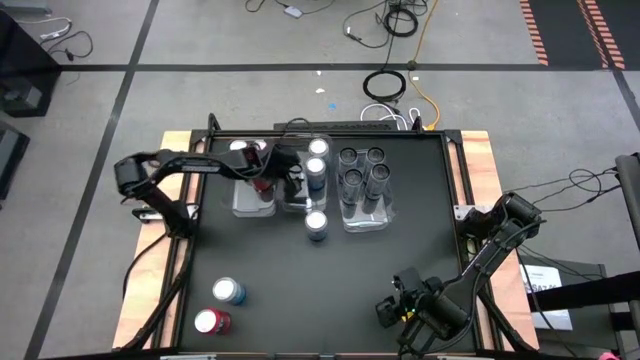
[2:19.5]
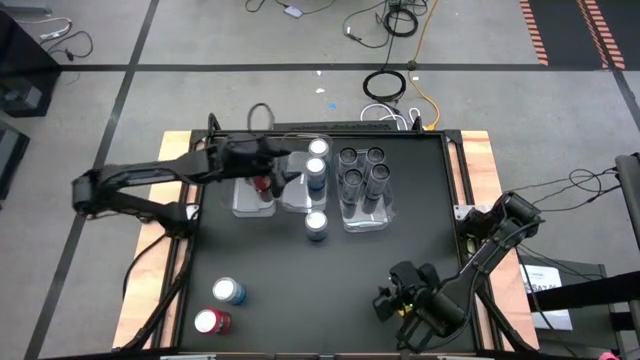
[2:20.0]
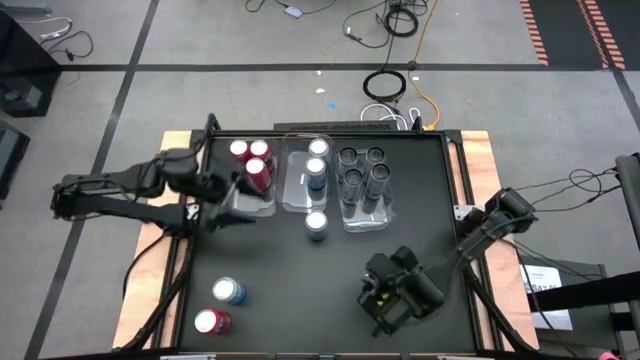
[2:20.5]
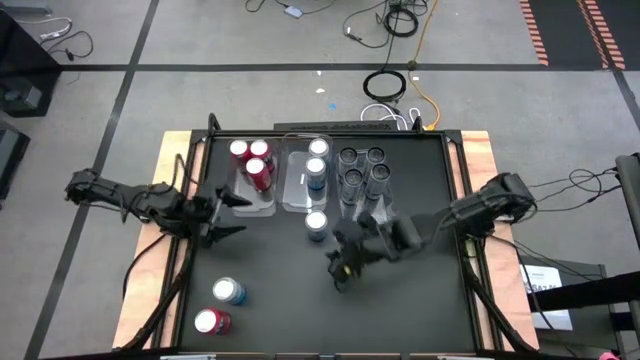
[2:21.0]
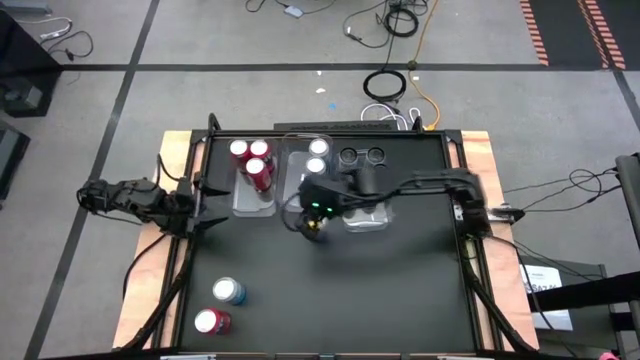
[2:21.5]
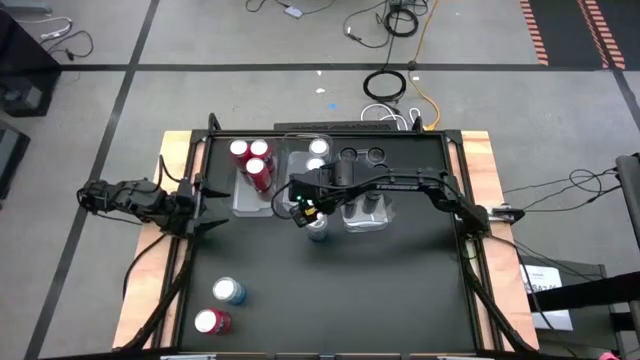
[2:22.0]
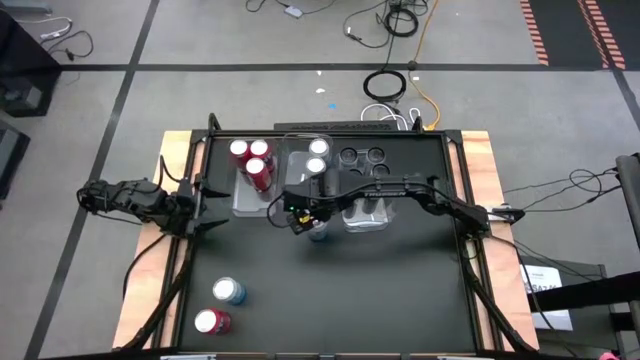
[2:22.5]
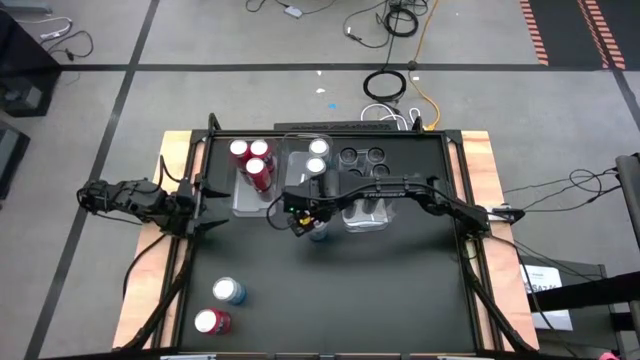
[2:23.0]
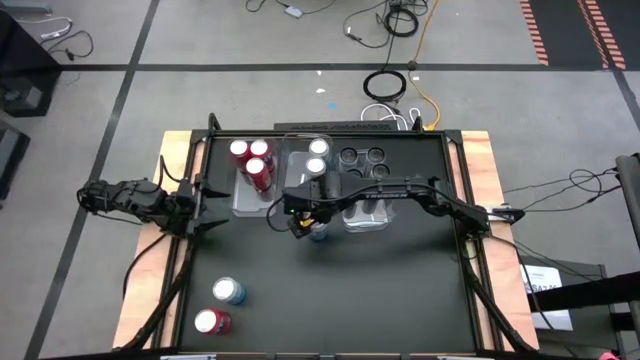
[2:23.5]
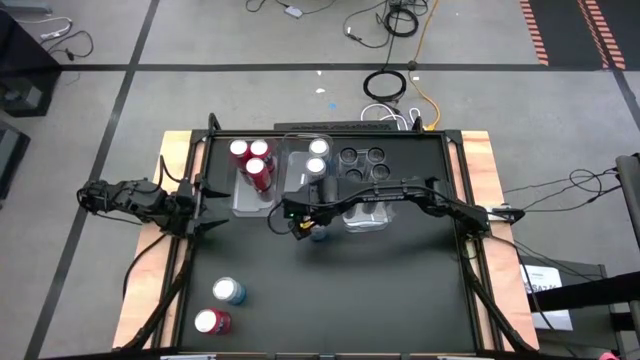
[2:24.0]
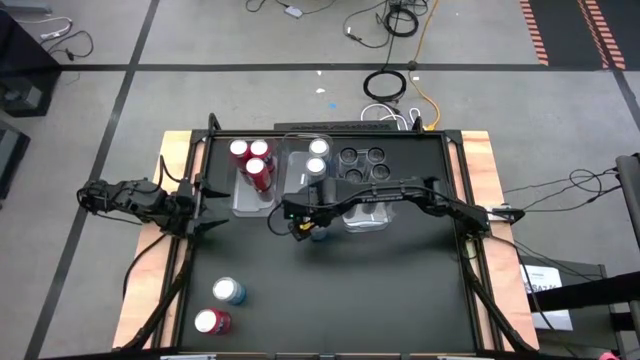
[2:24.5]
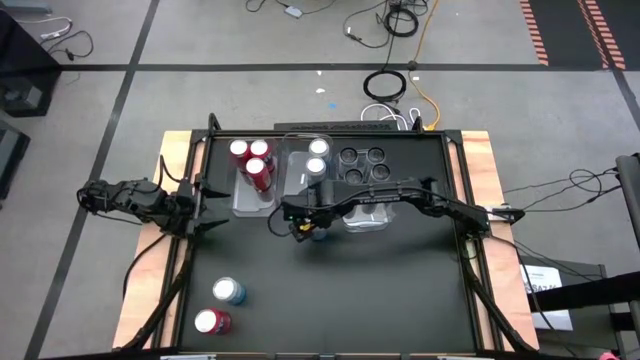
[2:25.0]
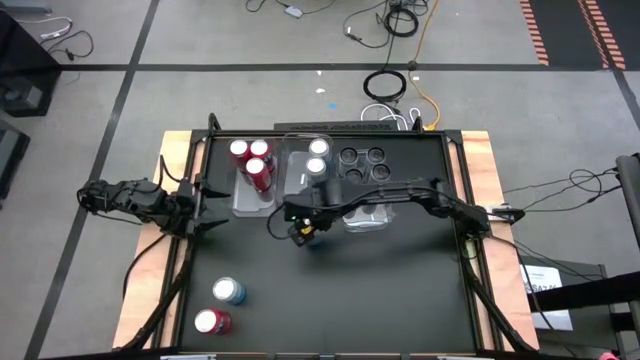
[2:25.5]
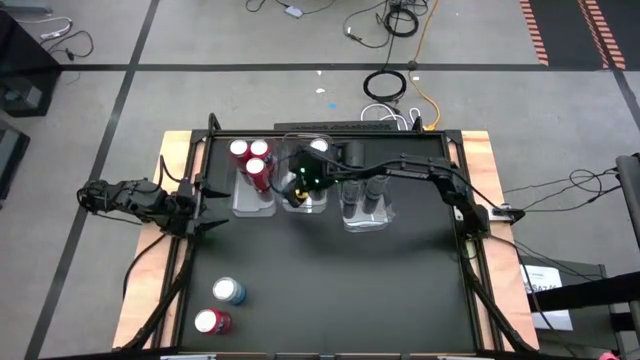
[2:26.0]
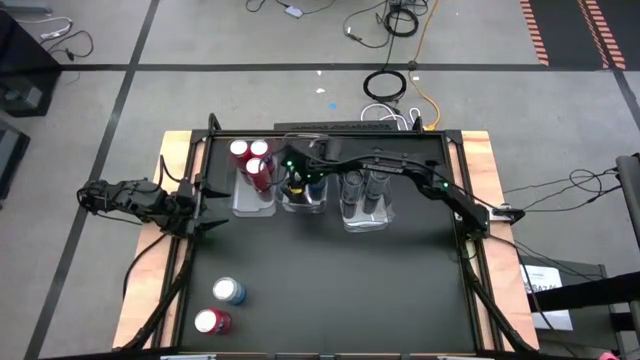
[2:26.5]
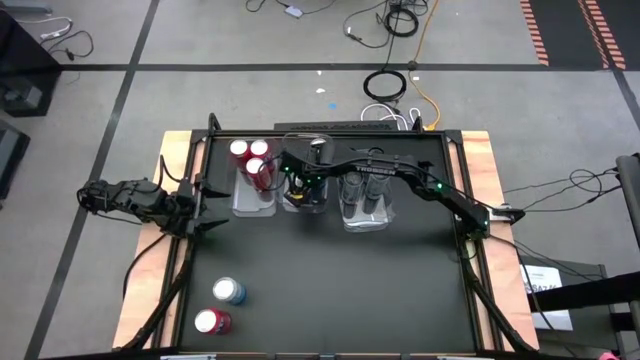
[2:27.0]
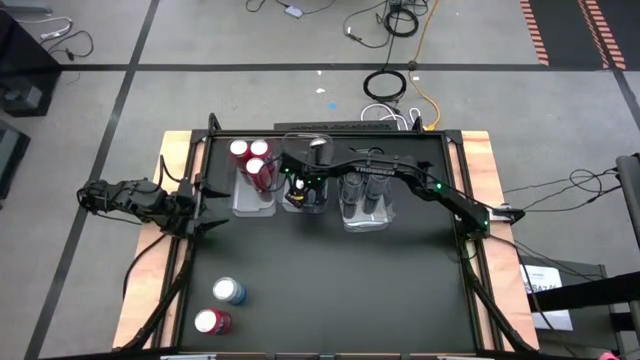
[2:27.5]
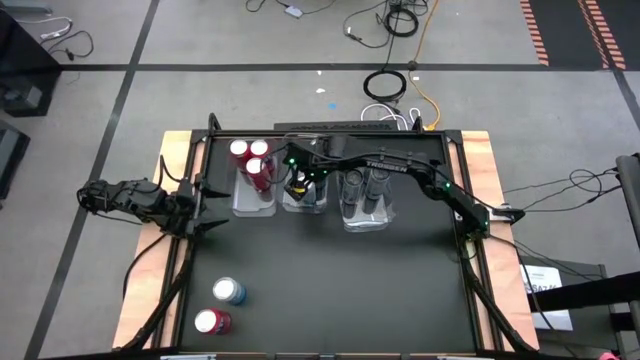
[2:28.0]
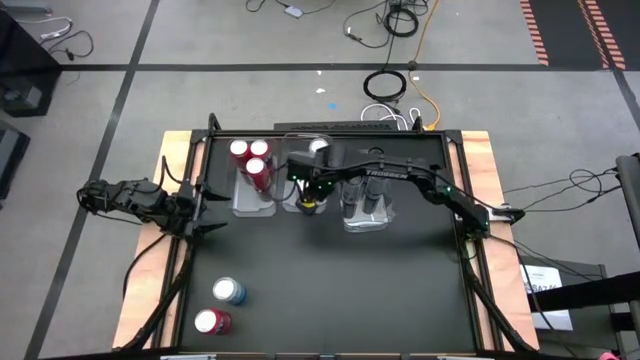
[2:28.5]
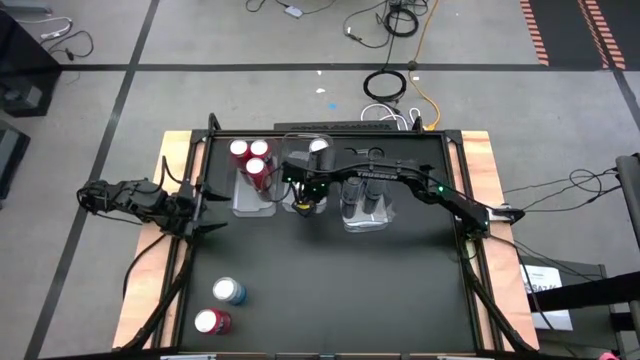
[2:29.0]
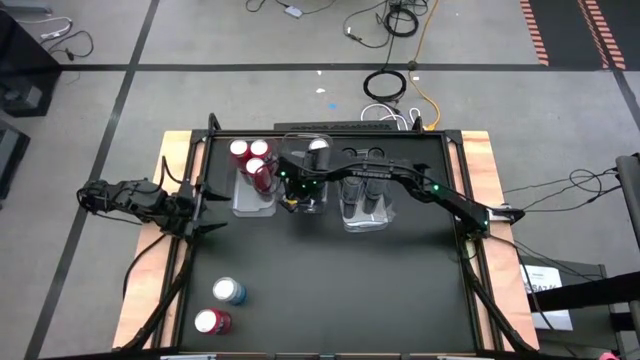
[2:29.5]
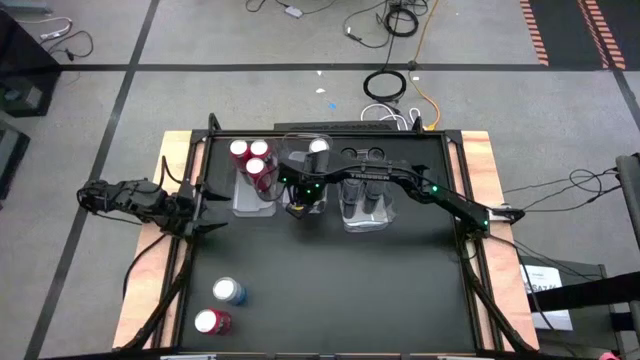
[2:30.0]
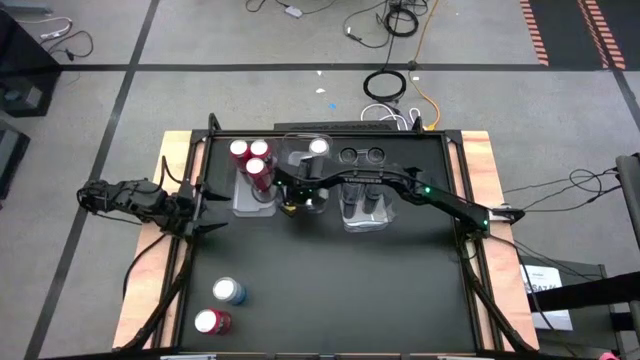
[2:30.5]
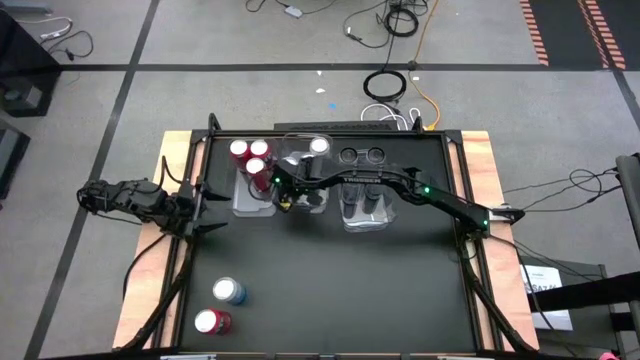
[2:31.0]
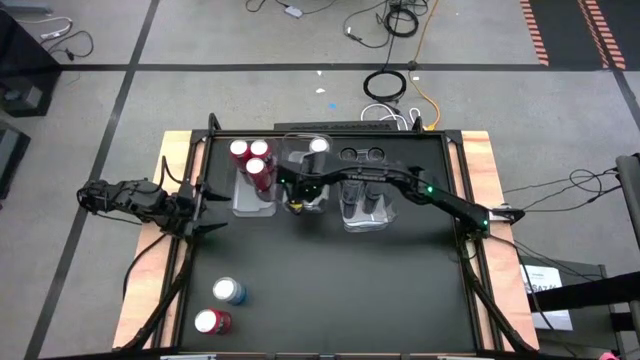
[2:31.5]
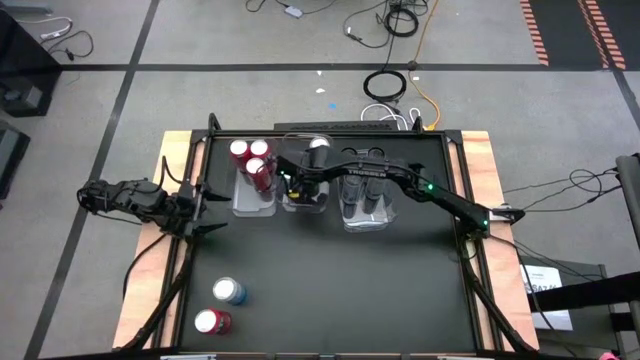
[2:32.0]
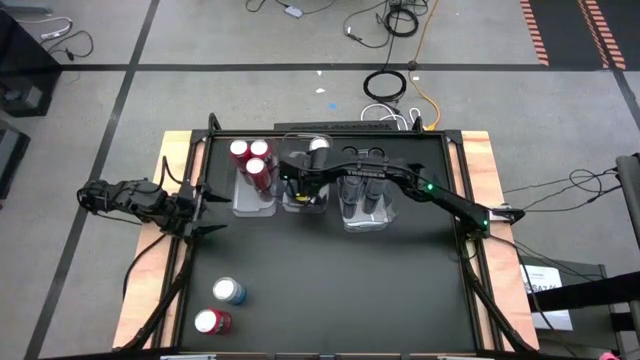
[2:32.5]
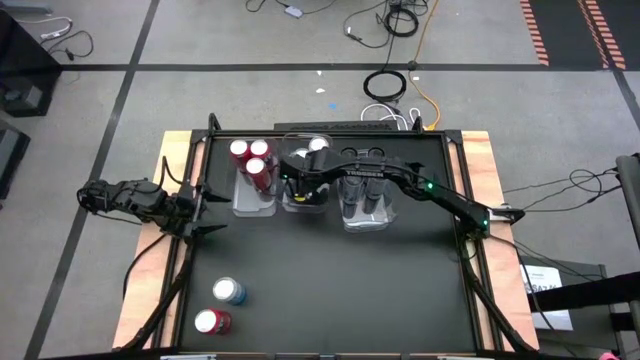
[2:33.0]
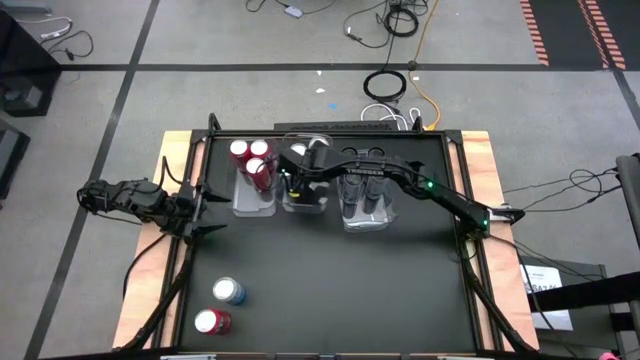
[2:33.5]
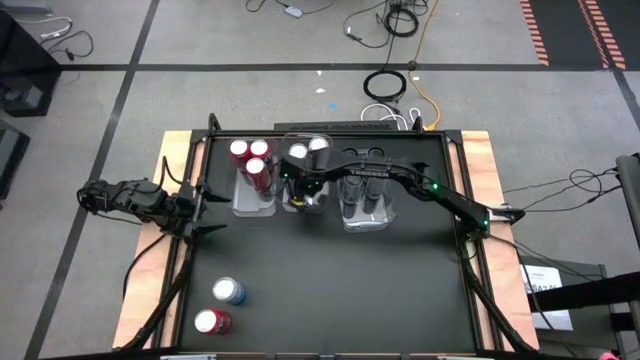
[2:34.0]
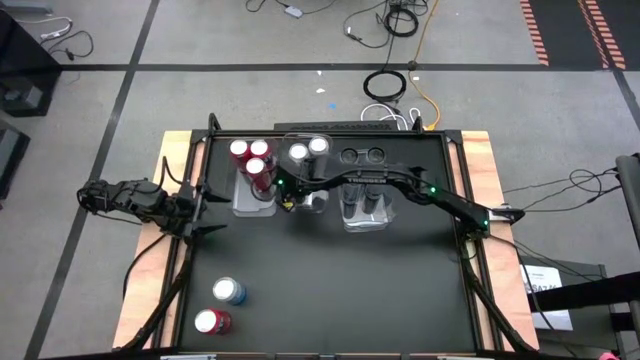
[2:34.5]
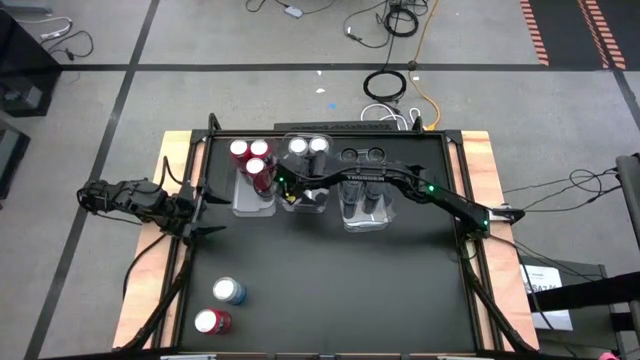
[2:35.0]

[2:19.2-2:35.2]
Task: Sort soda cans
Put the blue and white soda can into the middle transparent bin

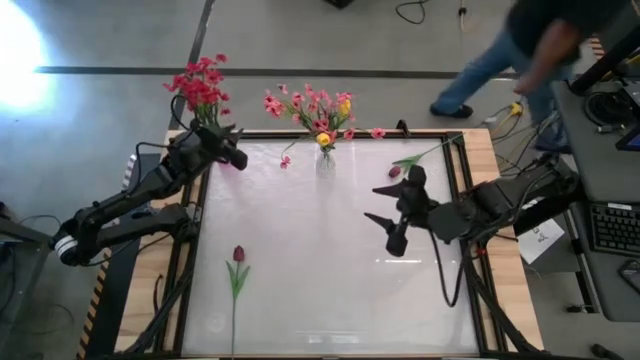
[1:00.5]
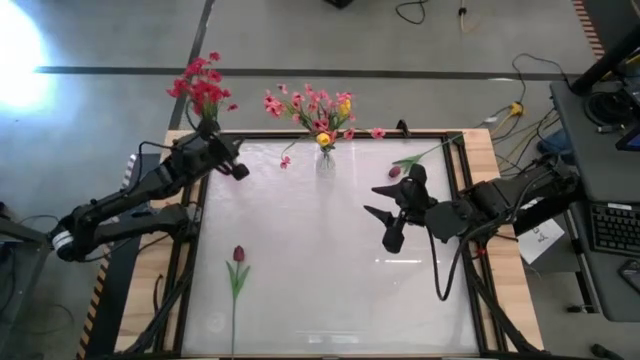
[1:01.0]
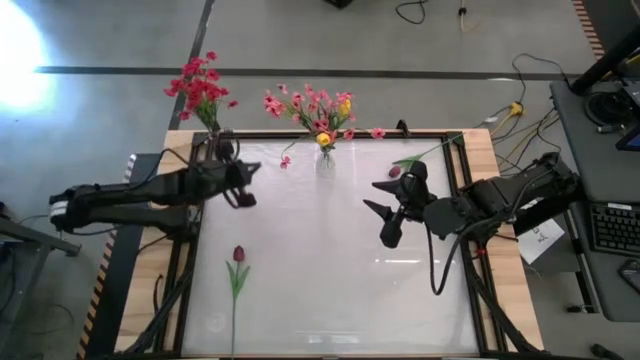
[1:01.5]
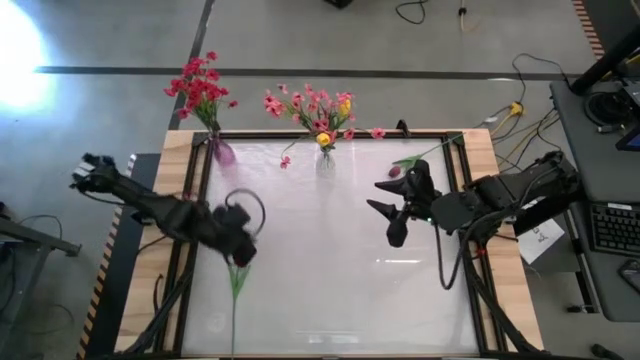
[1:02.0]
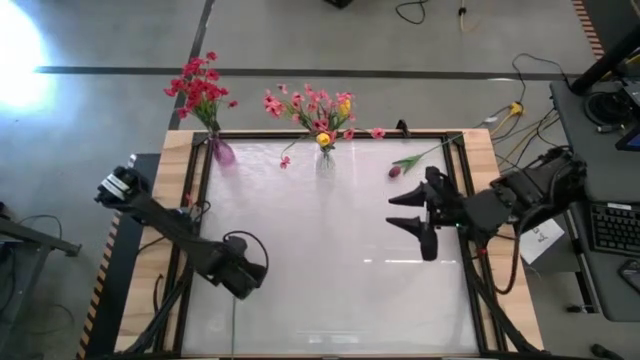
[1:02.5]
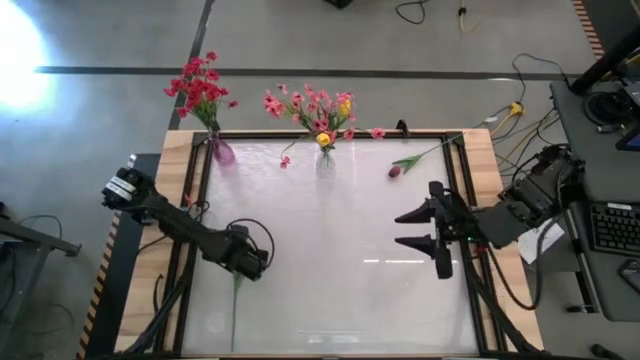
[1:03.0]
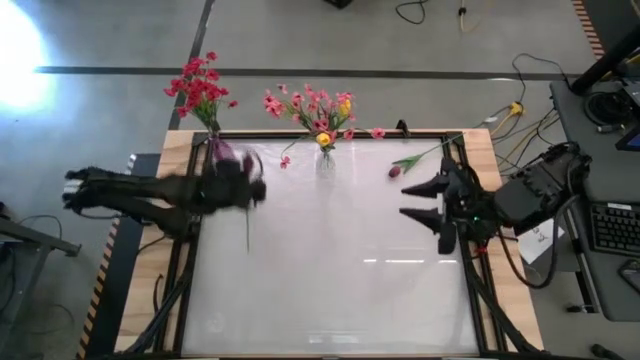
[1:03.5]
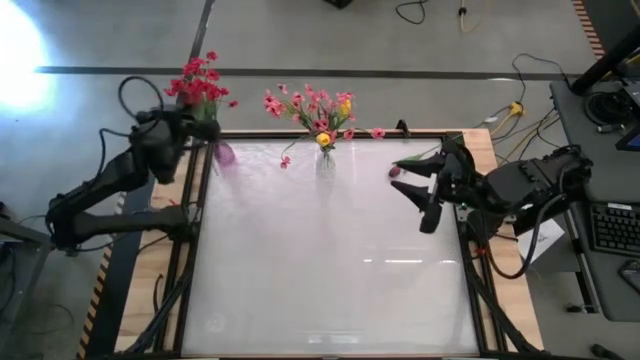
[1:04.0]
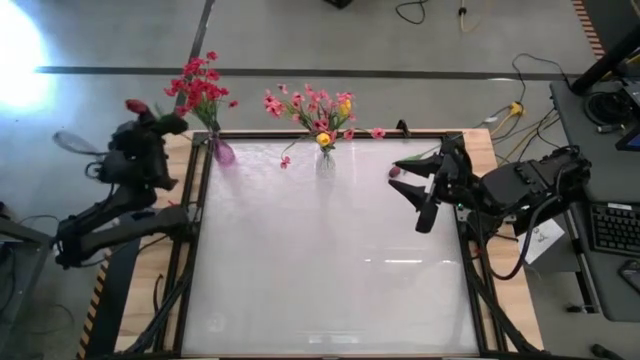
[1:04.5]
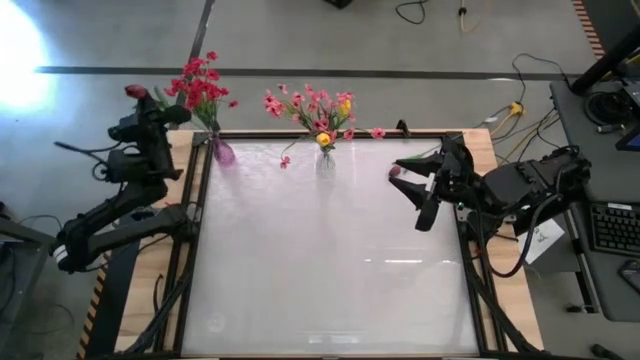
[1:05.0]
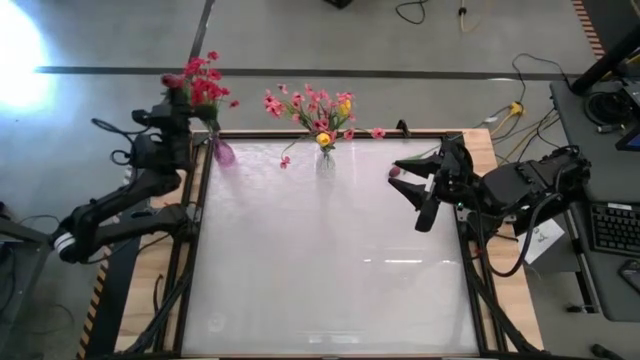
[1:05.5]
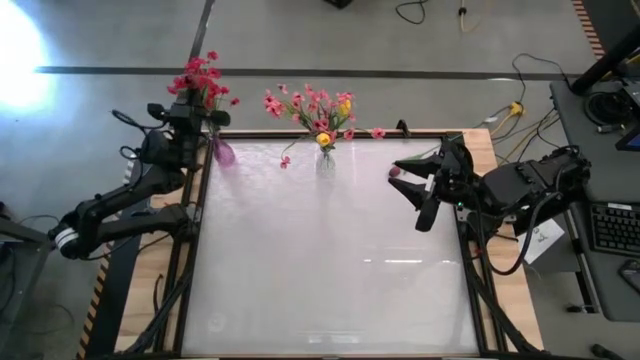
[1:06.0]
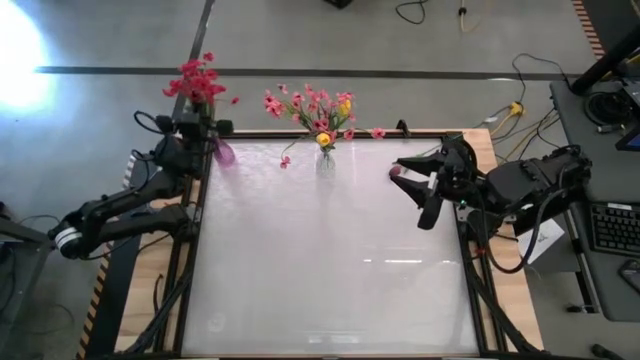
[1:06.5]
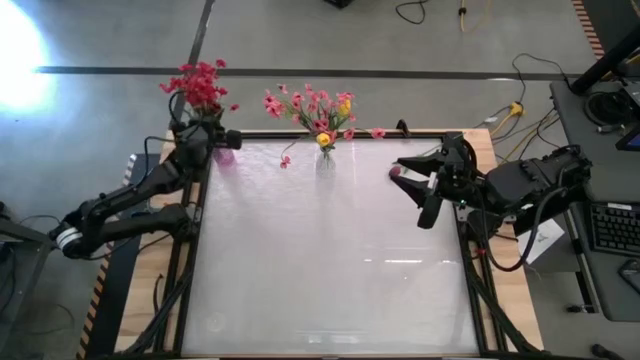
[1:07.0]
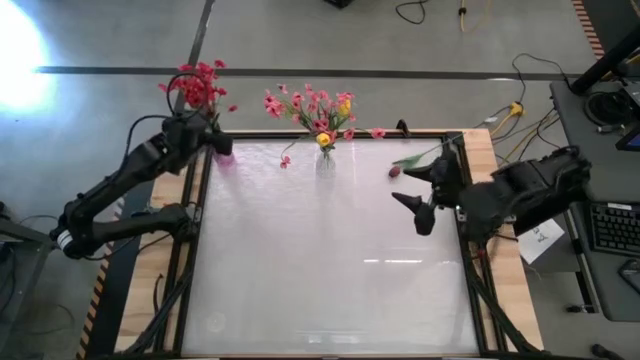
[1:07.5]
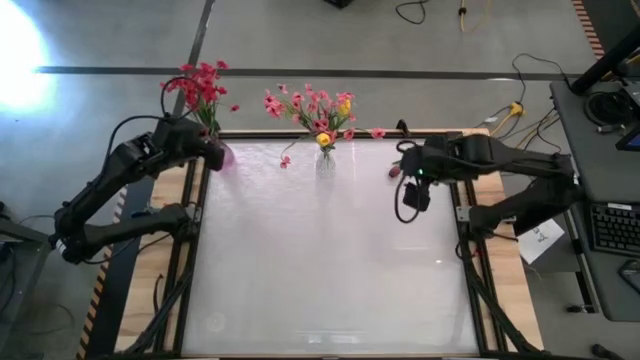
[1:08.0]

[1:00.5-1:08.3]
Task: Sort flowers into vase by color
Put the left red tulip into the purple vase
